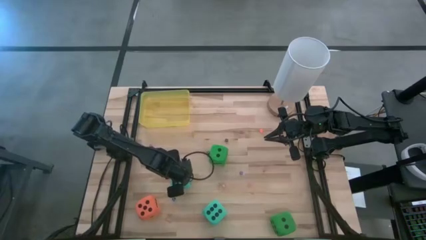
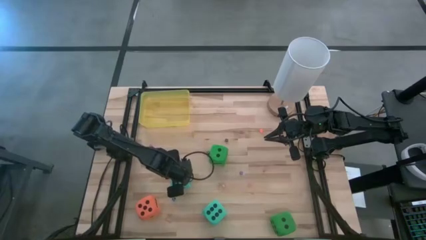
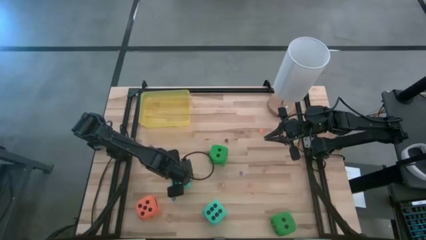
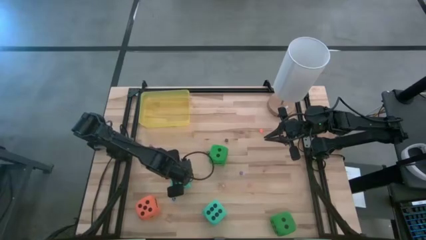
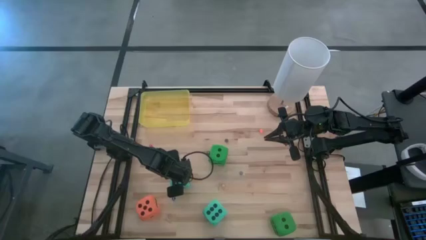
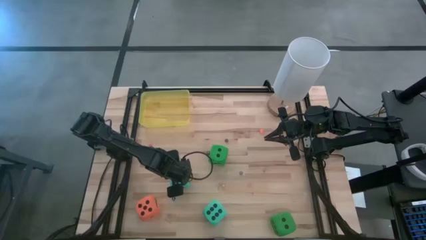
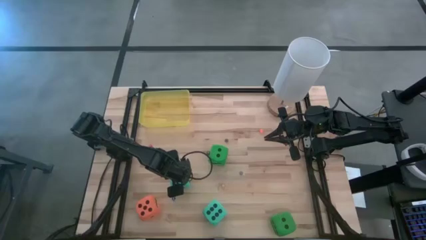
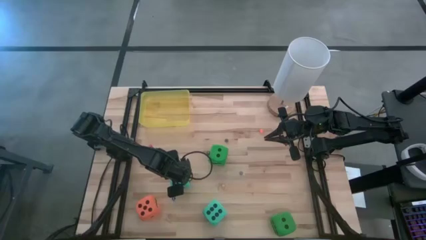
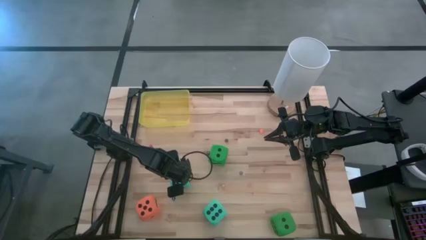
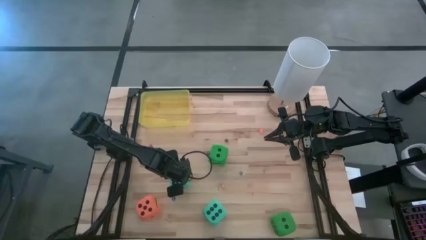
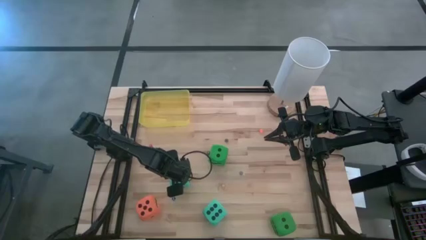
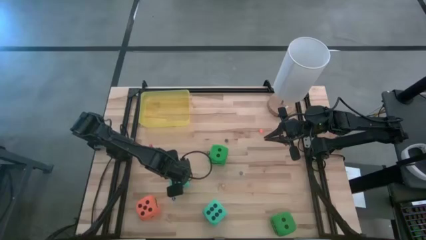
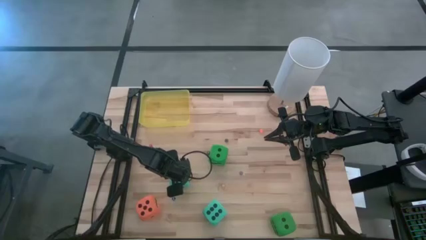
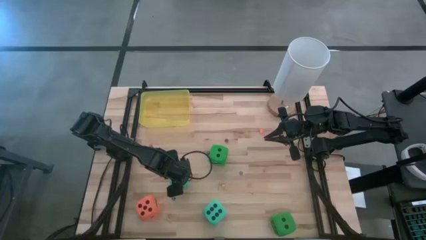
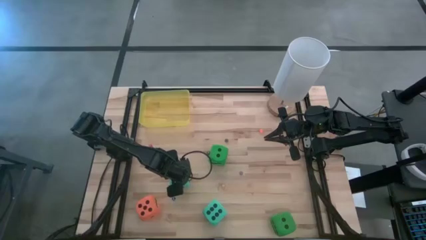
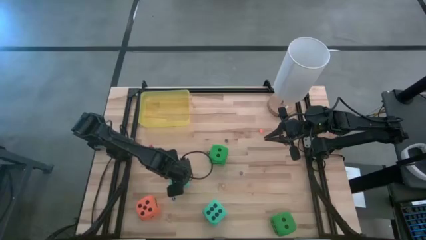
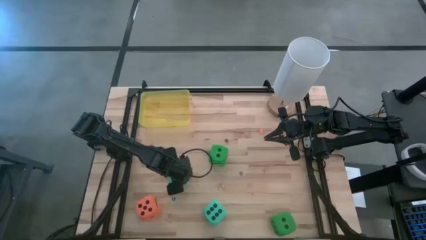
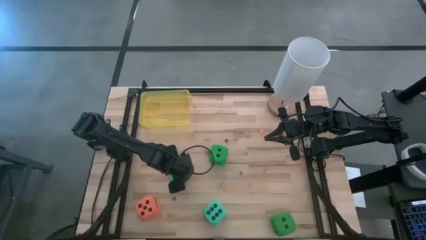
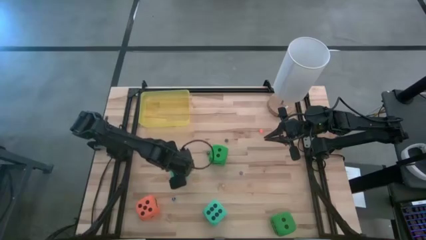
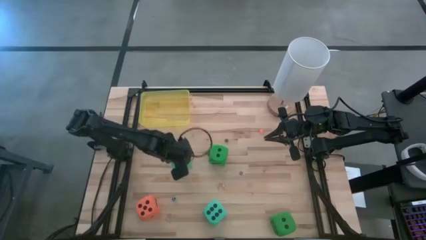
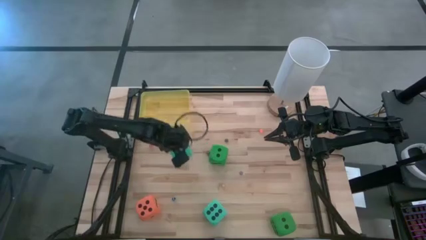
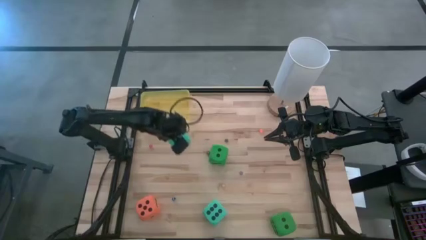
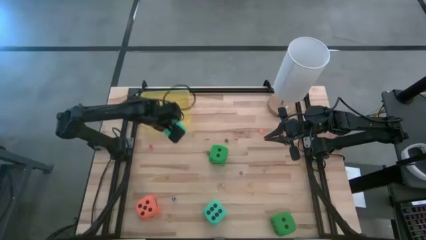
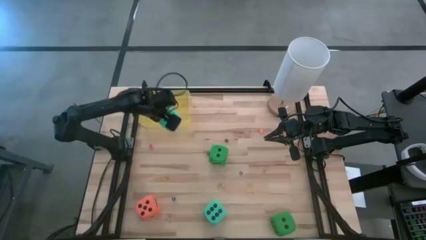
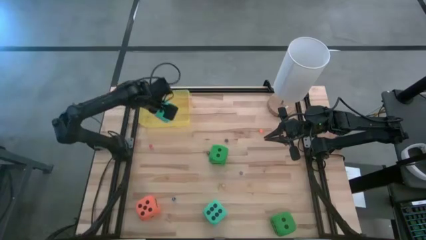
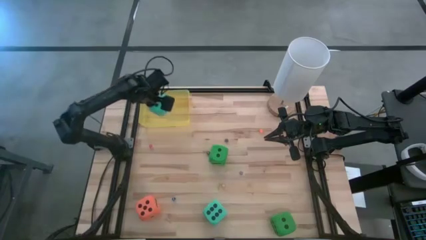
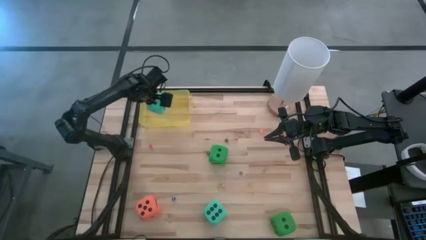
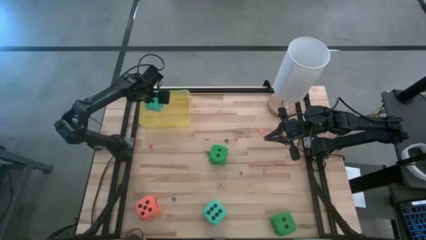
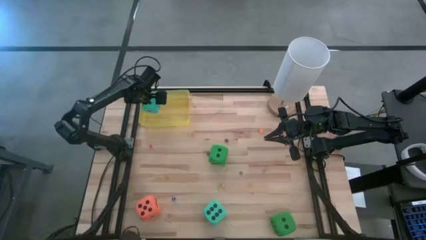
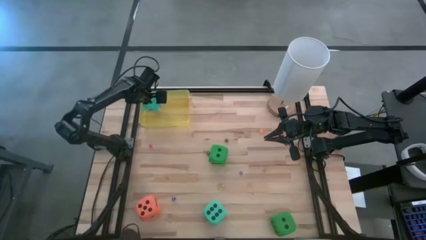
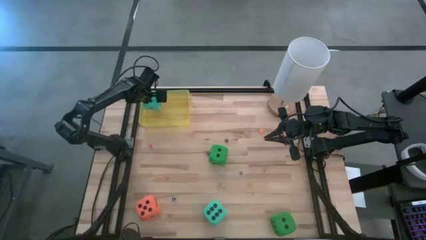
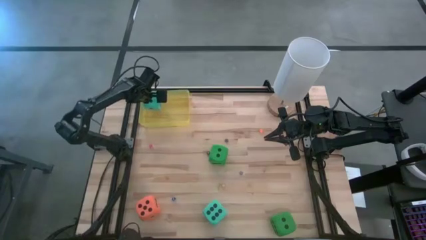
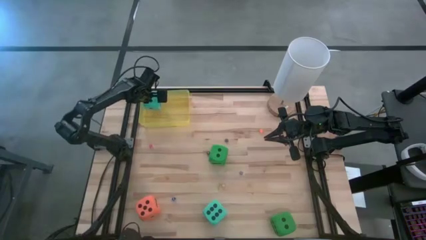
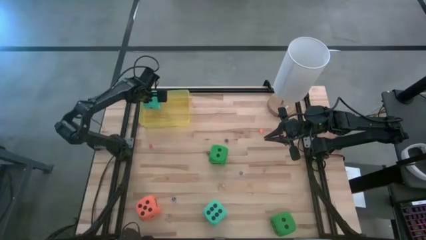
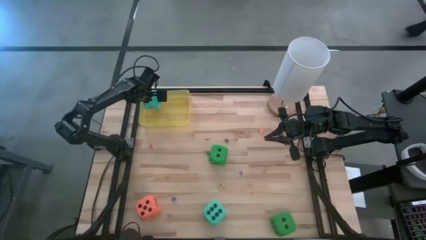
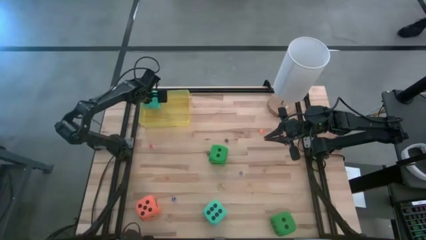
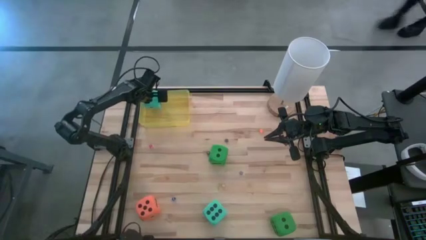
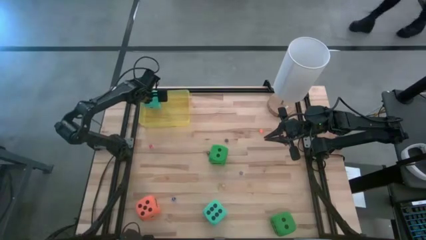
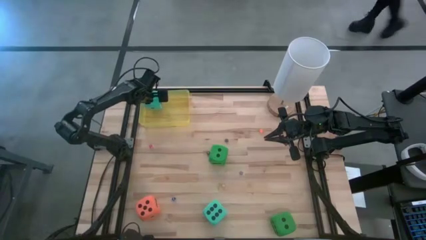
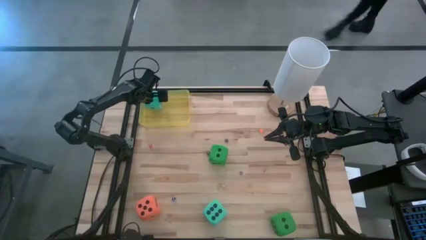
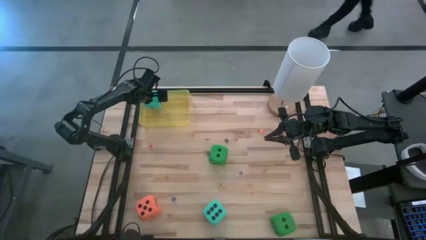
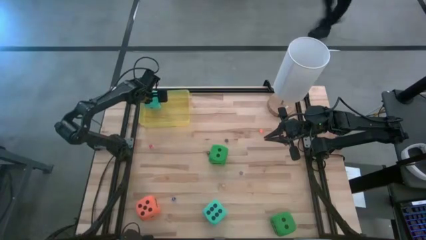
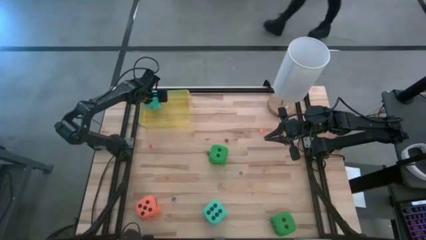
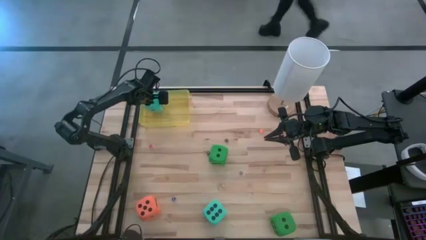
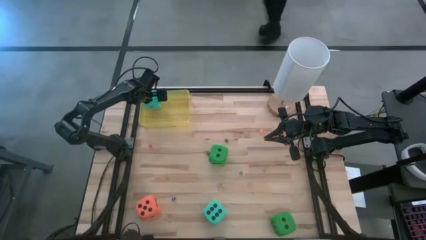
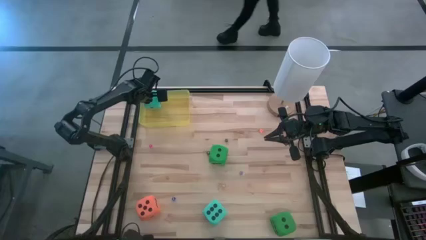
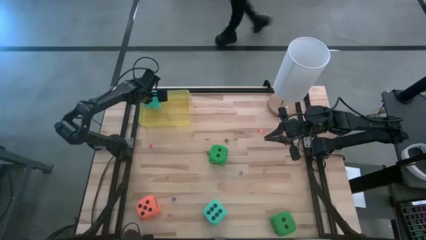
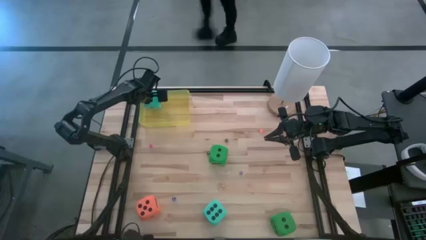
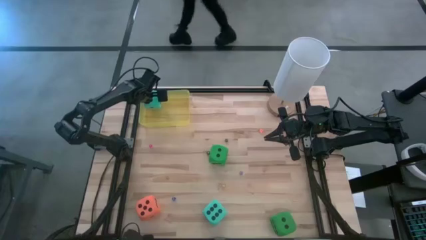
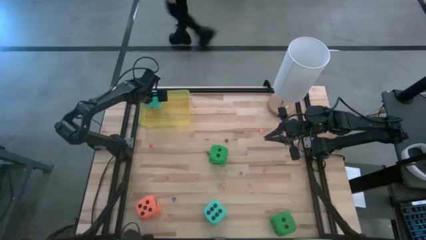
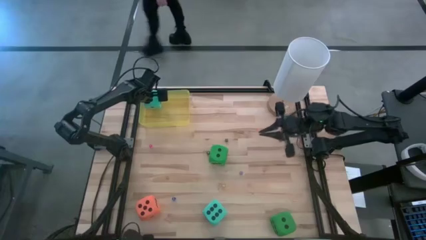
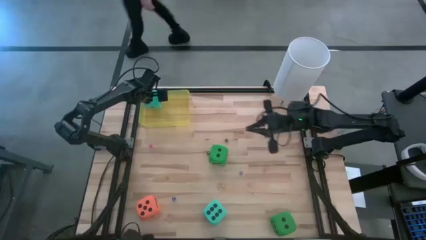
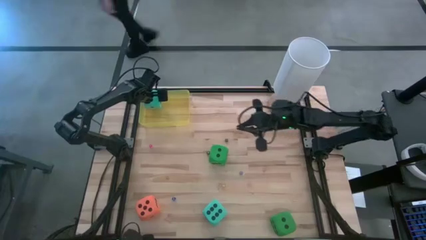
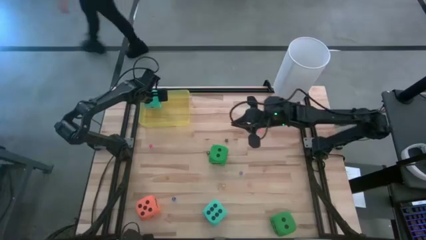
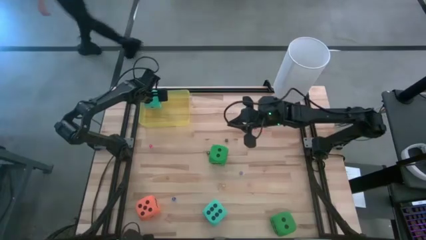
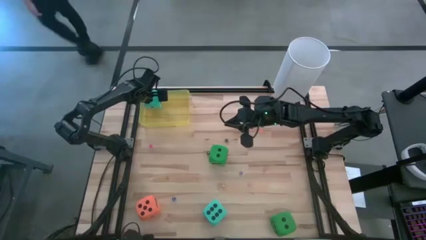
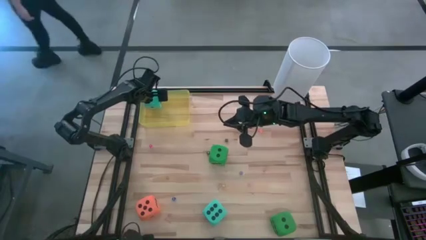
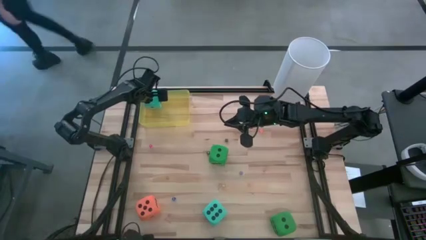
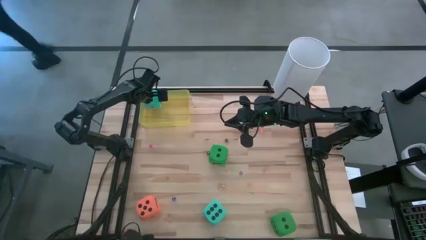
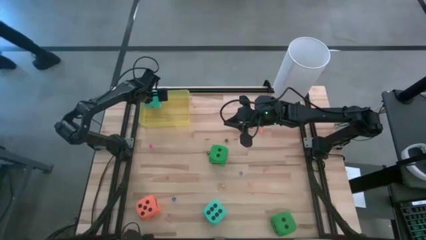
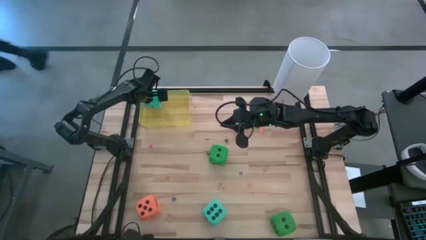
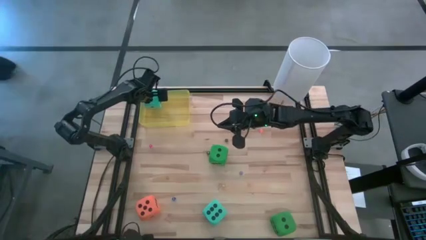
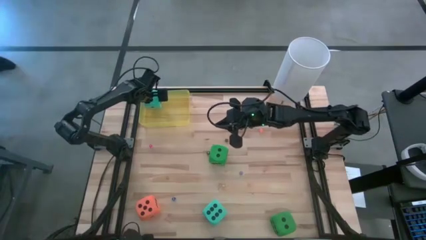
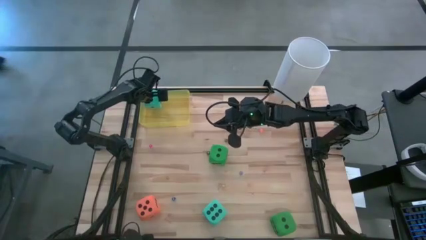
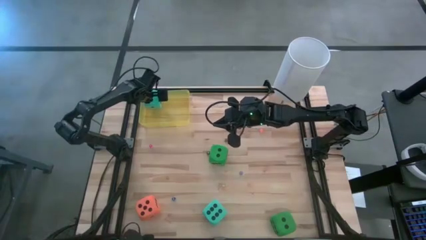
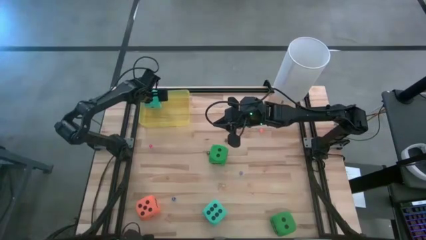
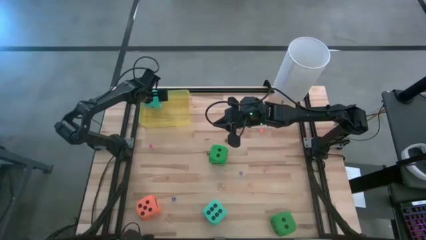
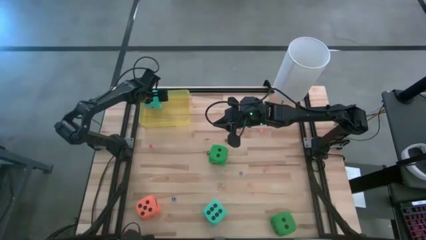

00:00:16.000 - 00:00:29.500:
Task: Pick & Place Dice
Put the top blue large die into the yellow container
